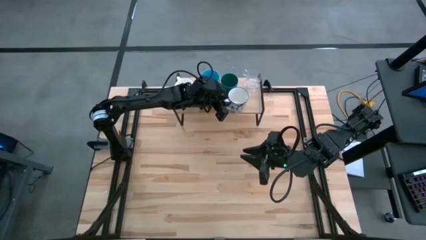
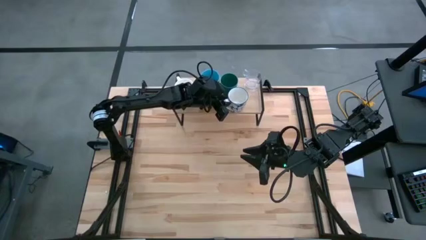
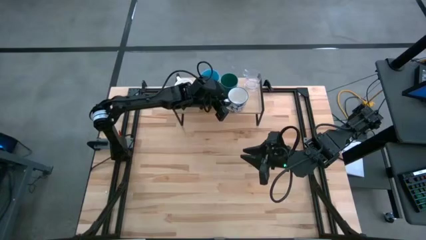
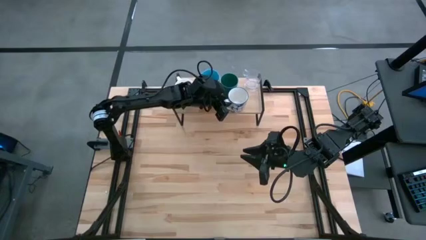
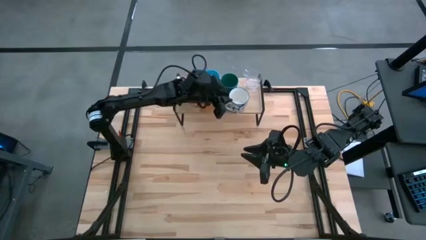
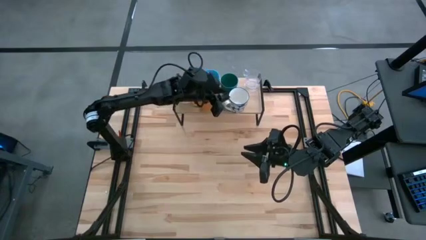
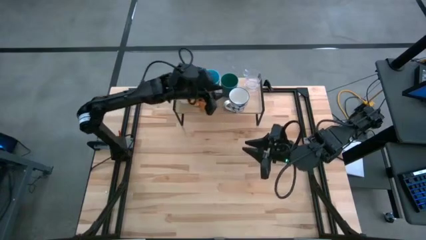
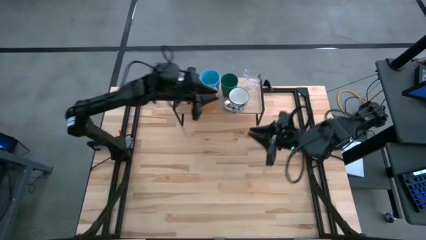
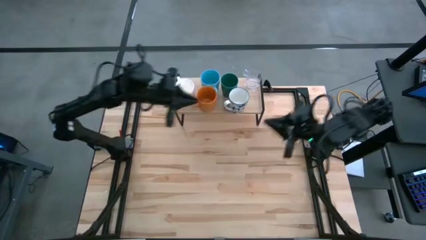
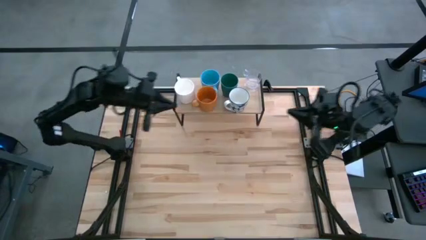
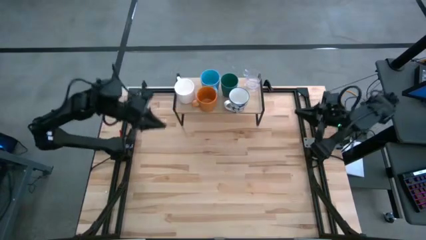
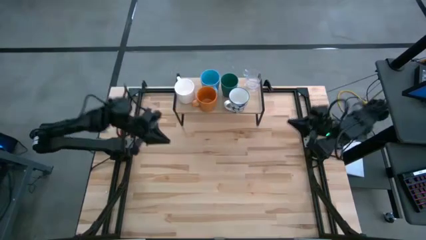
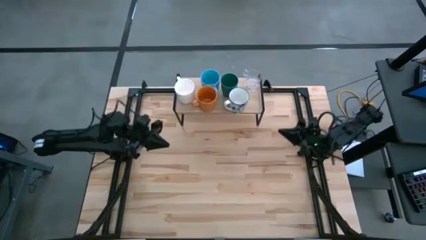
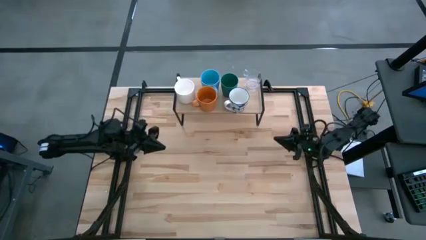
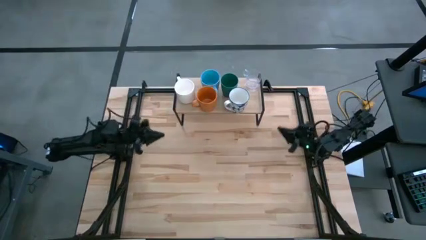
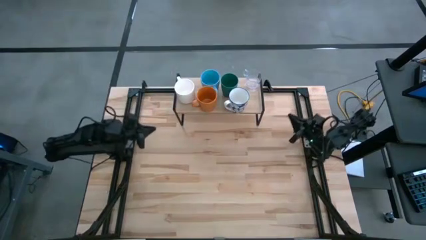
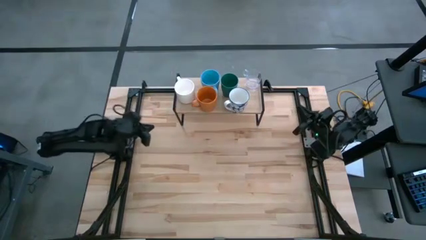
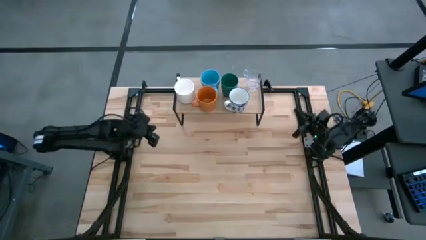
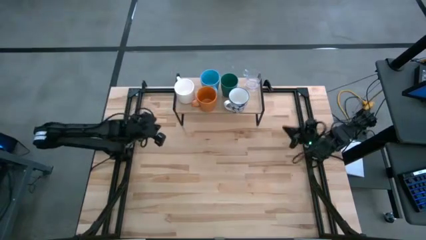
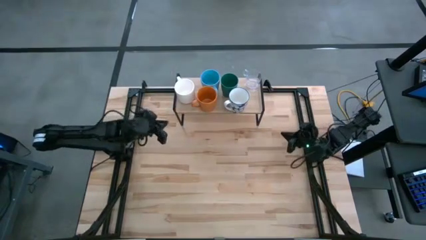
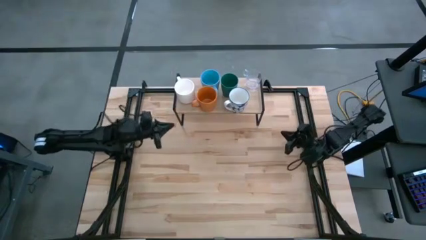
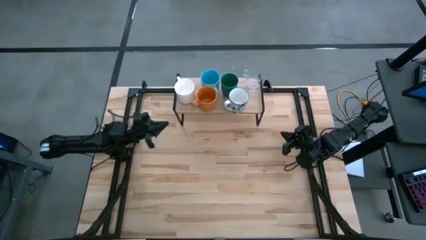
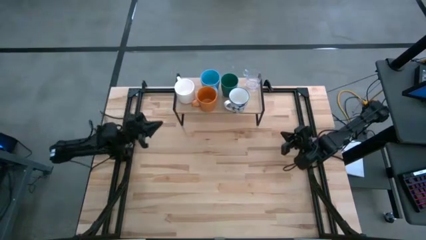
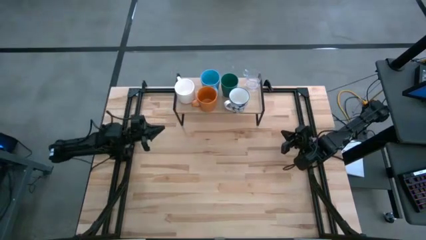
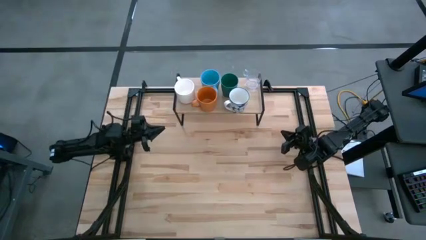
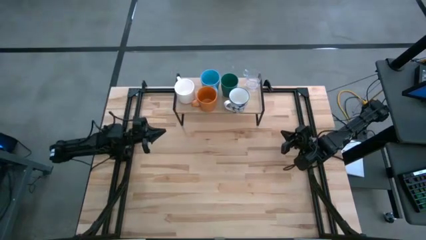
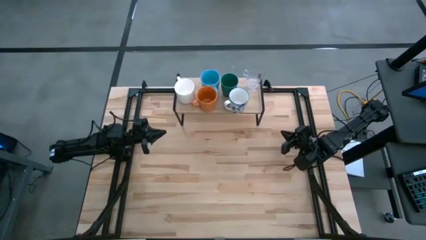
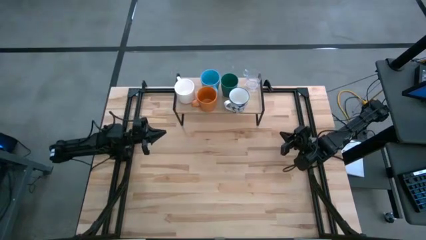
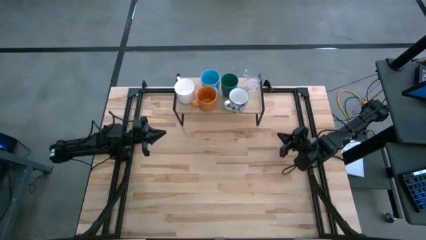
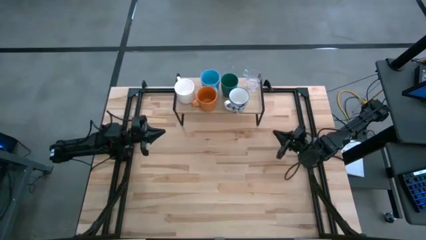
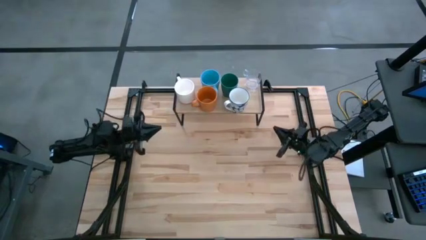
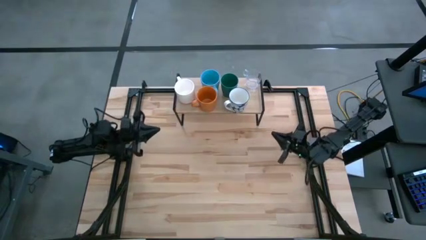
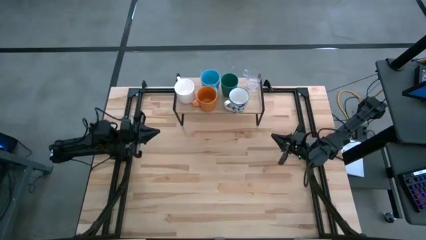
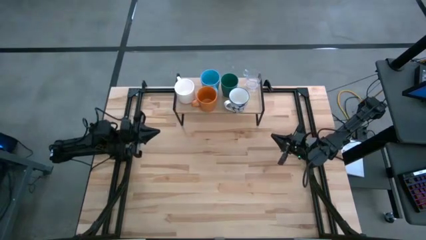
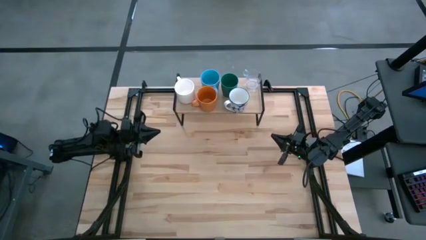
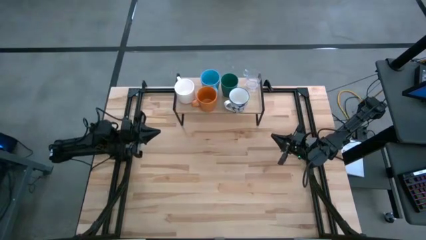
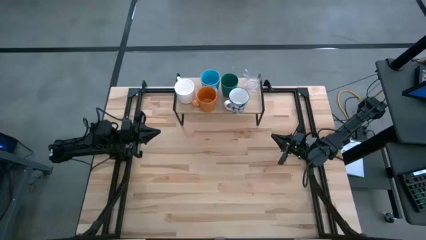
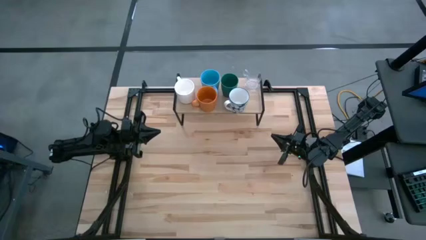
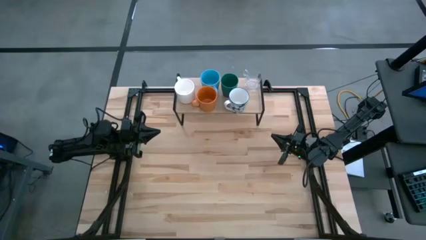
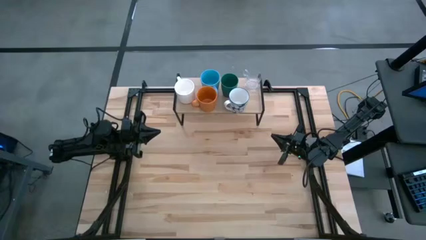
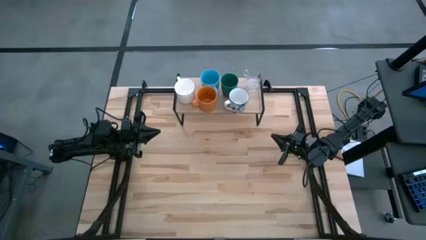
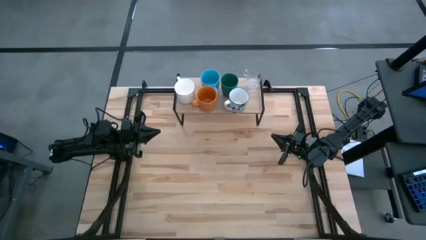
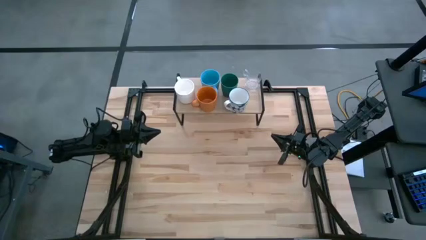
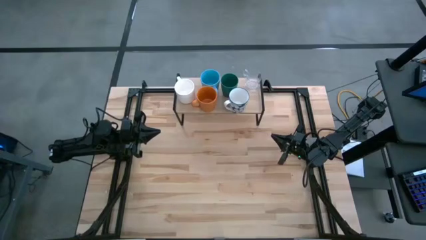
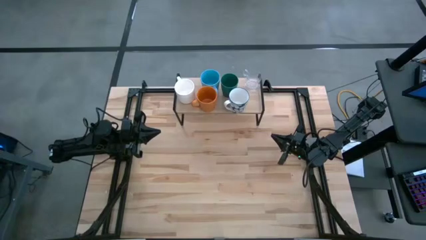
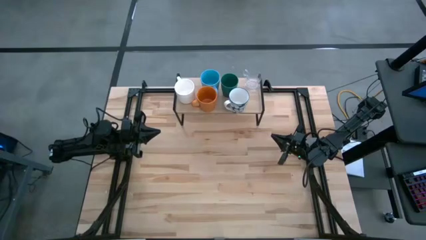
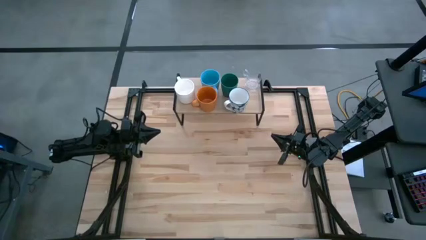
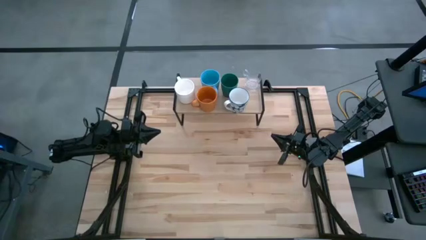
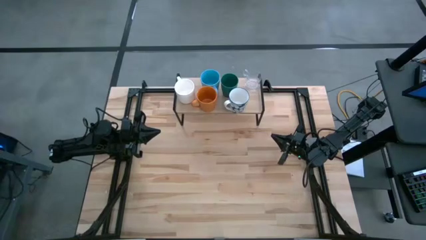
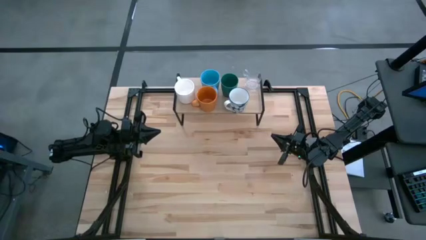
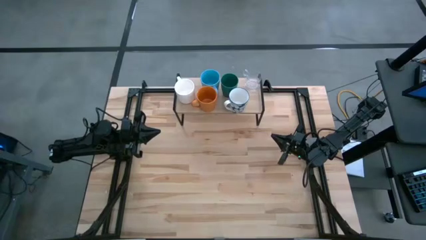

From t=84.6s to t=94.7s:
Task: Stack small to large cups/mugs on shelf
Return to Home Position

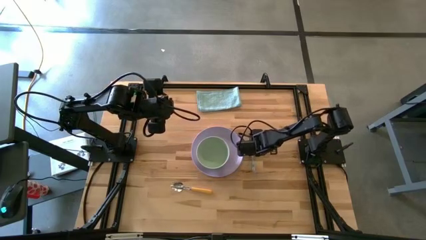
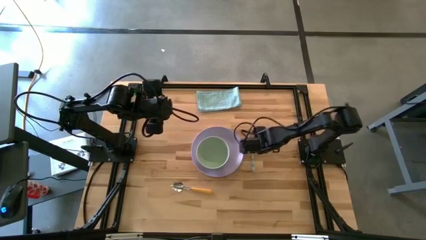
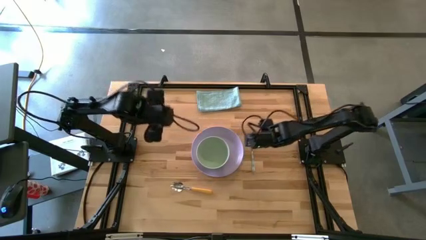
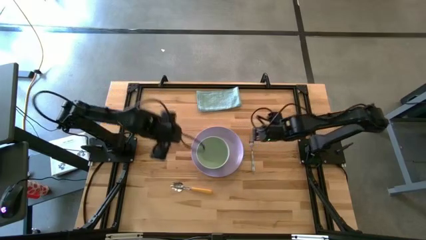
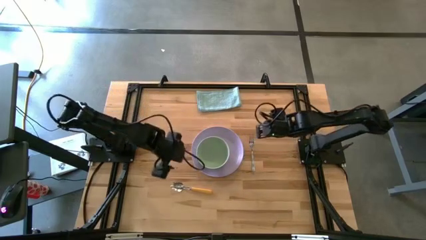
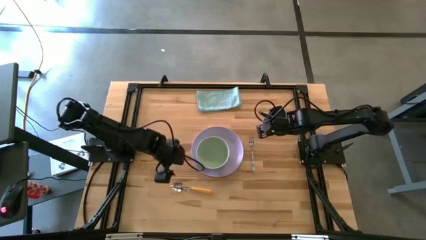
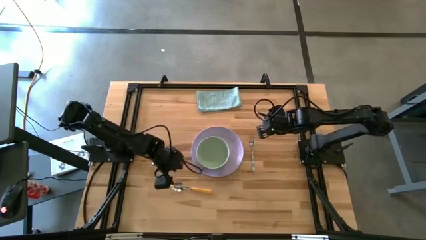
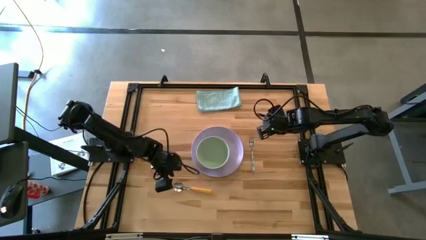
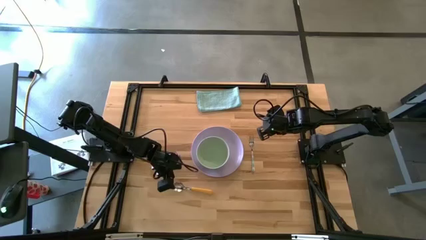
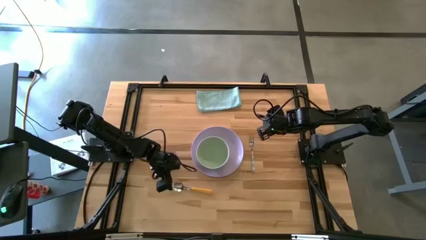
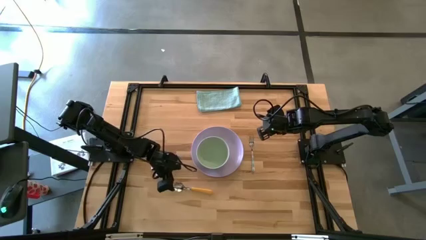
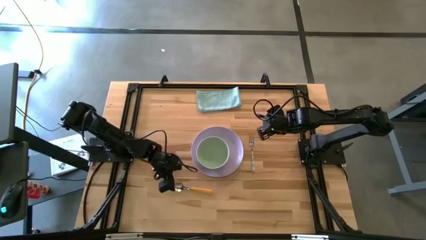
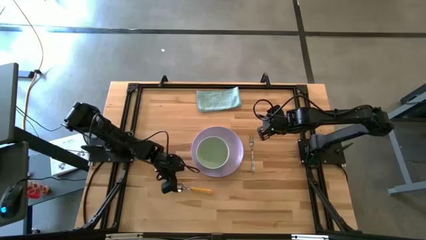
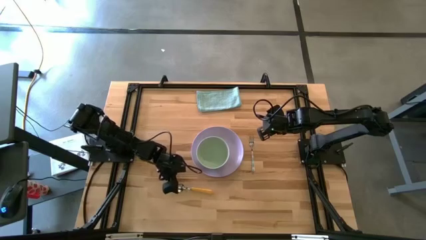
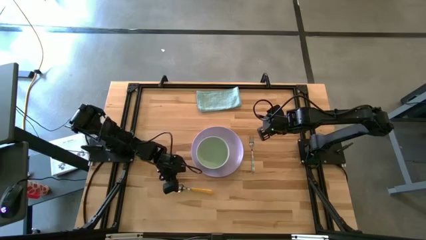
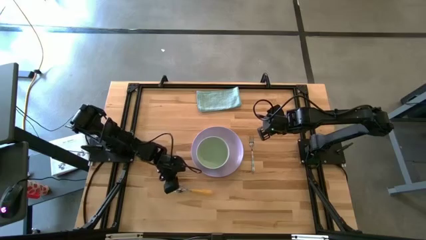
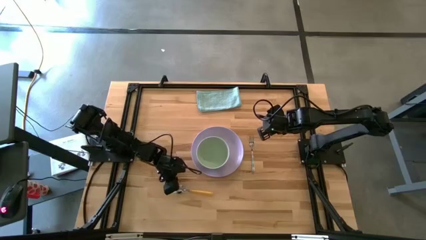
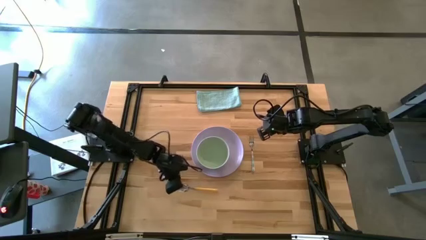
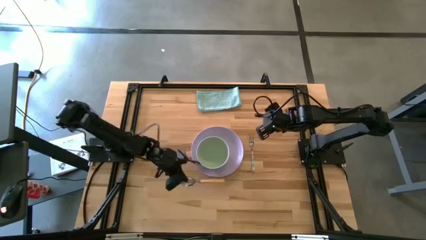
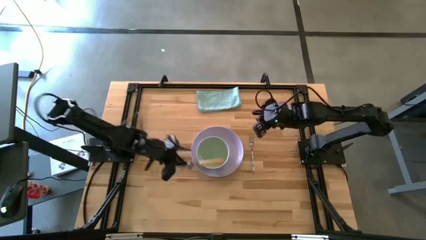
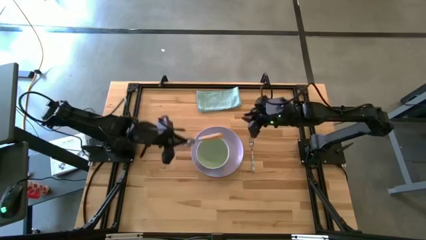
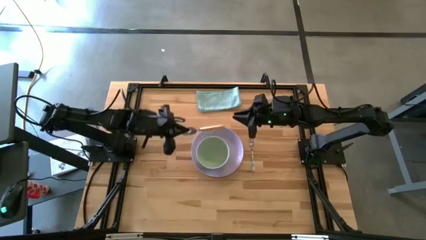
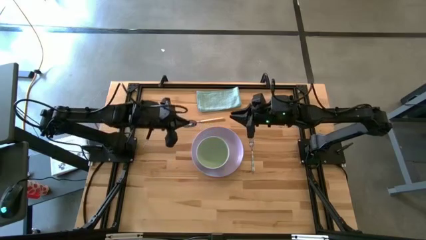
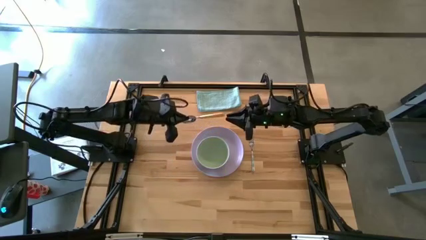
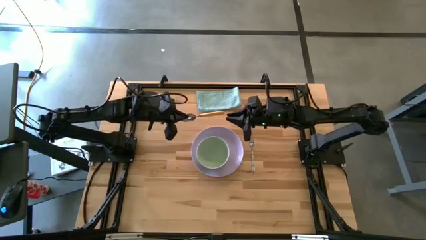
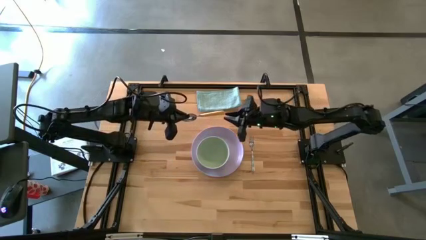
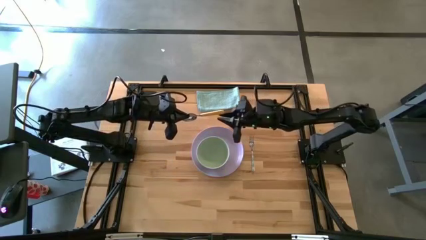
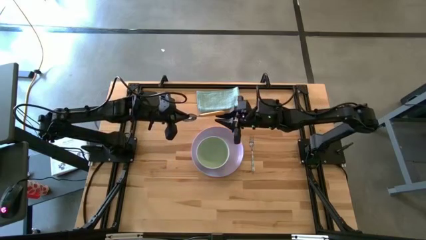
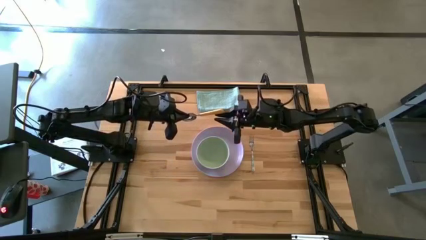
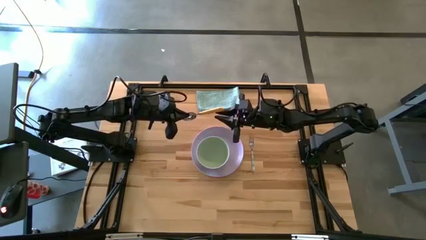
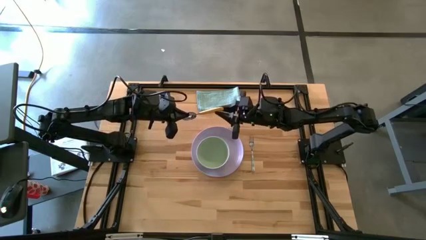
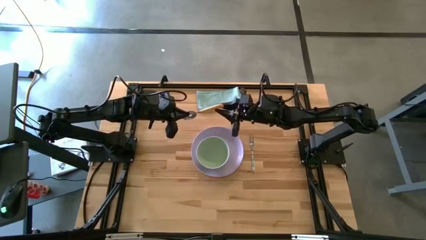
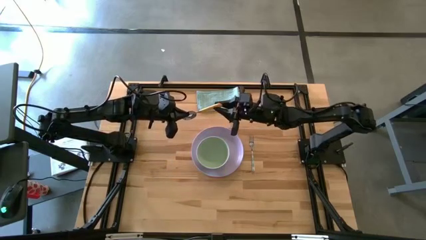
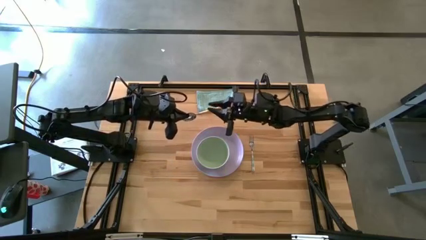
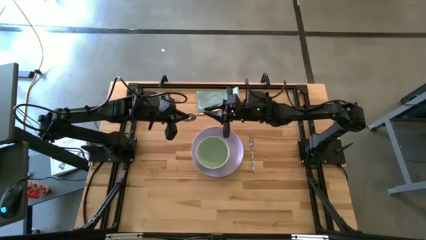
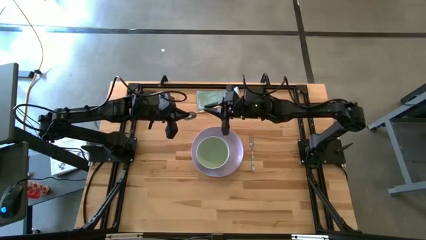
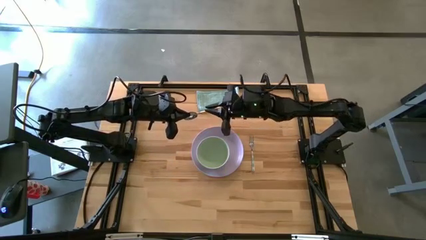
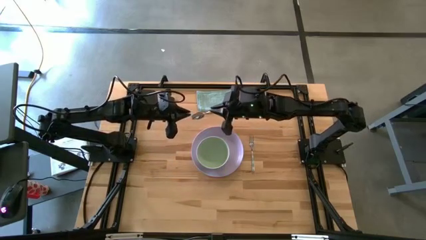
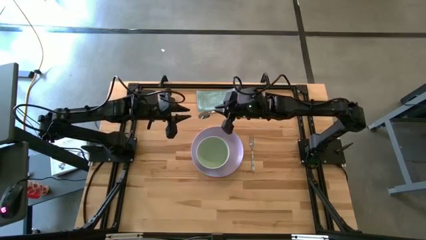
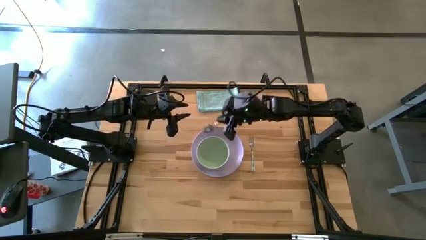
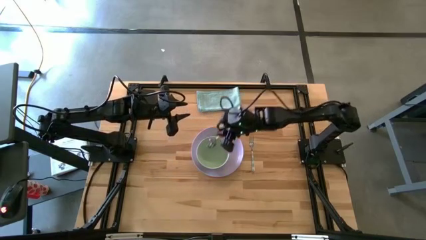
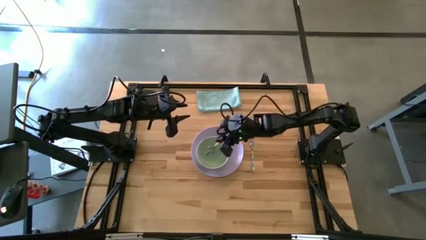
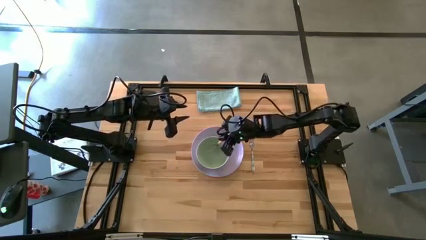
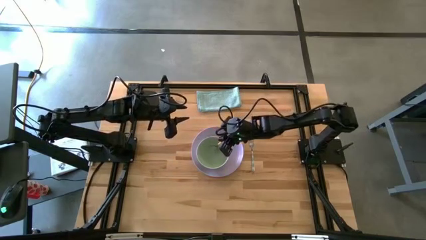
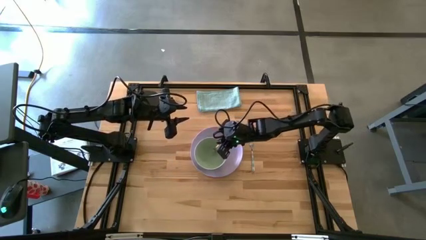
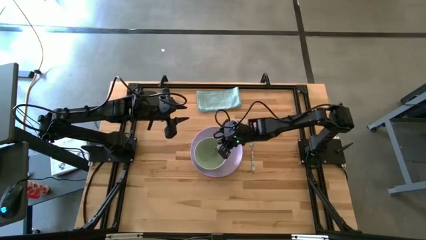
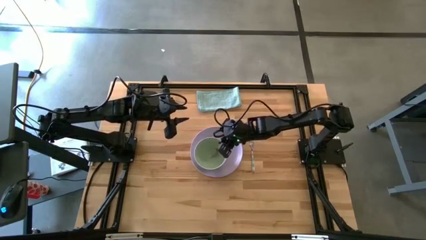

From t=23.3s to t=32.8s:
Task: Set table place
Put the yellow spoon into the green bowl
